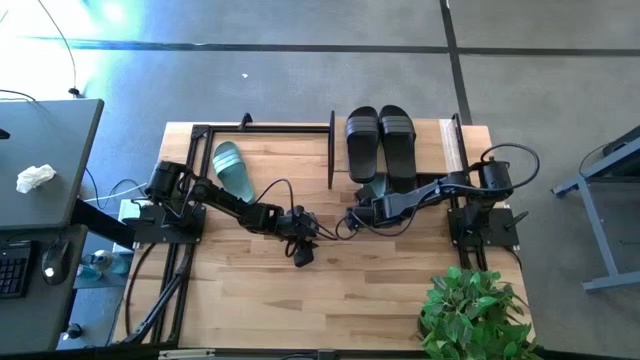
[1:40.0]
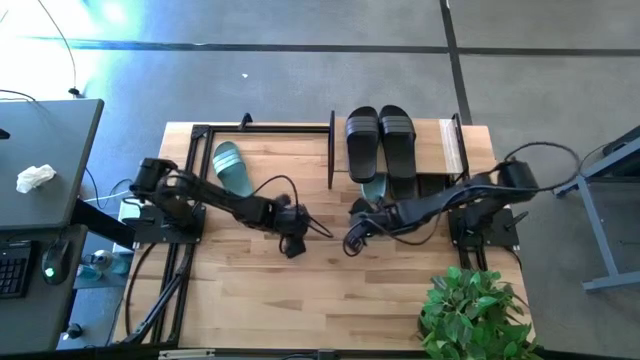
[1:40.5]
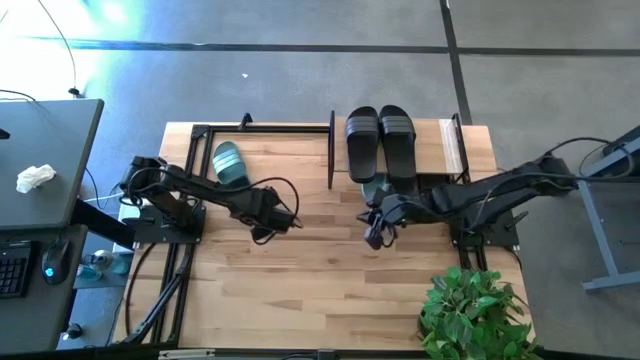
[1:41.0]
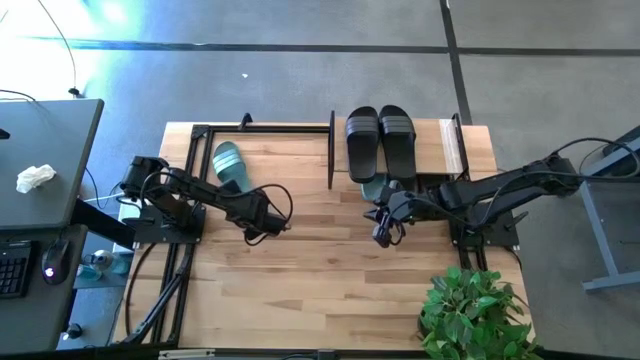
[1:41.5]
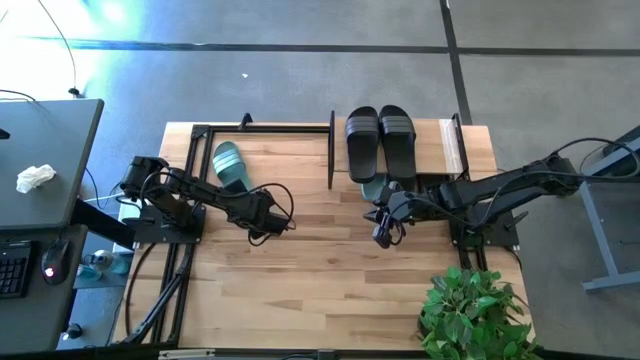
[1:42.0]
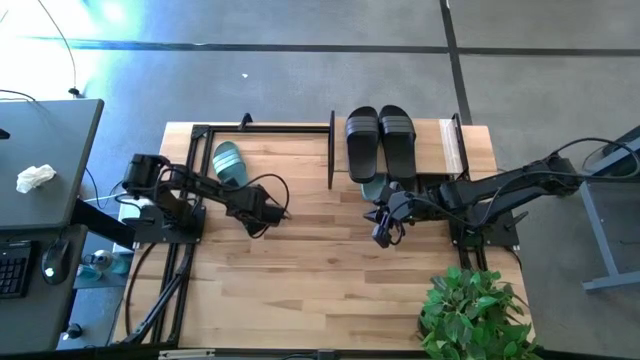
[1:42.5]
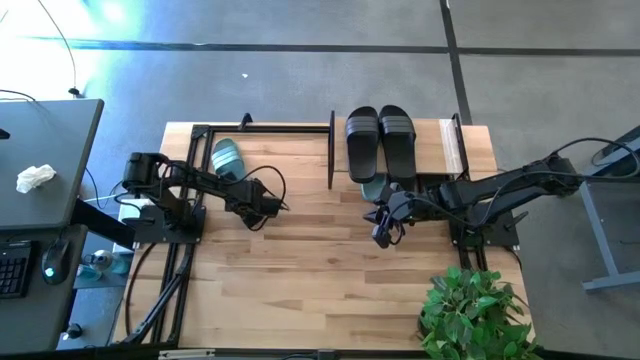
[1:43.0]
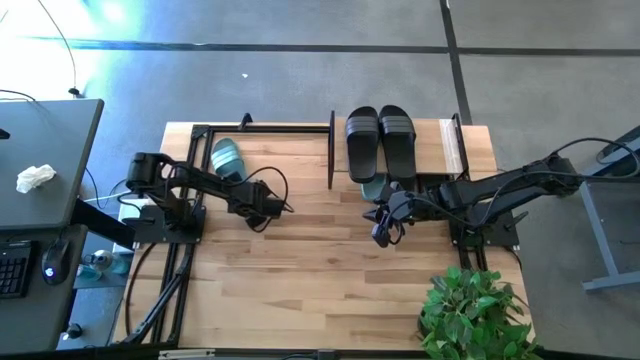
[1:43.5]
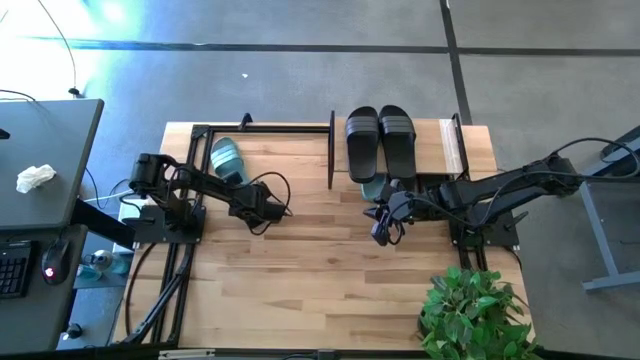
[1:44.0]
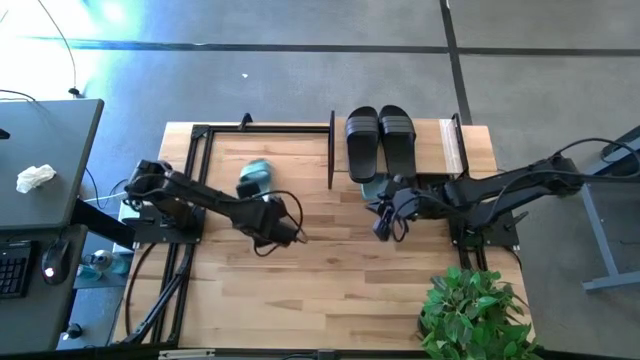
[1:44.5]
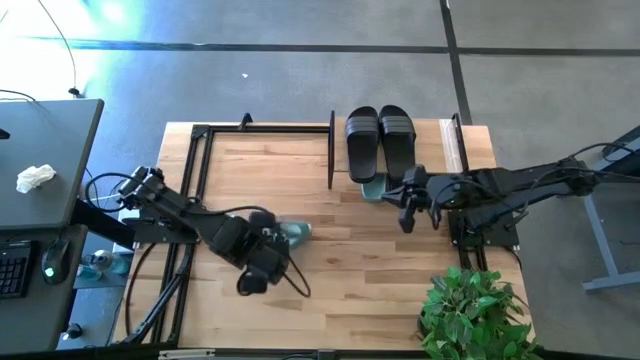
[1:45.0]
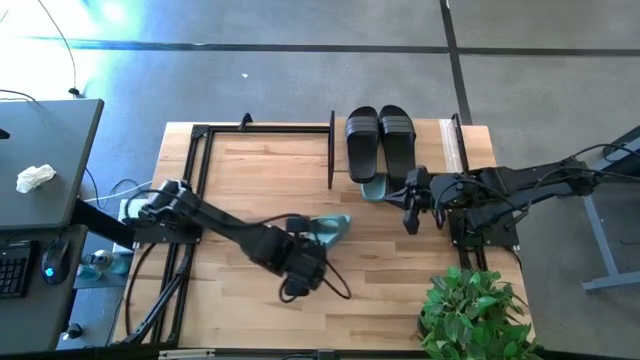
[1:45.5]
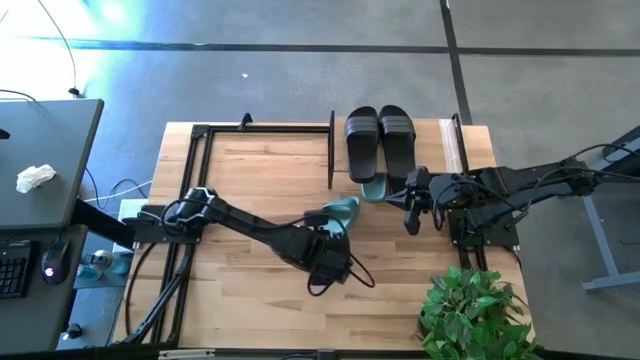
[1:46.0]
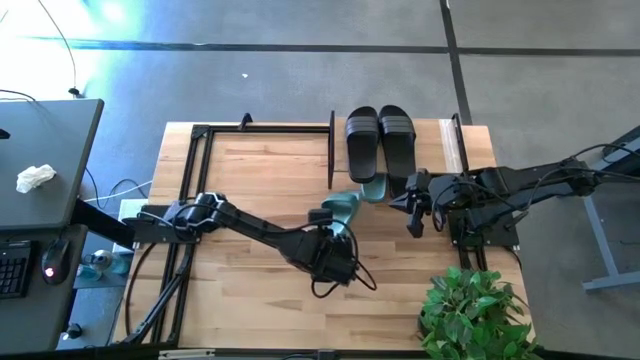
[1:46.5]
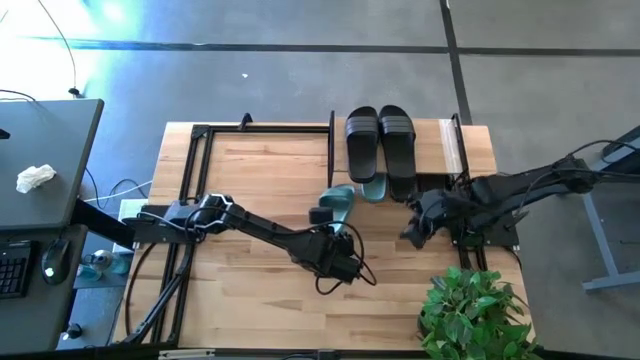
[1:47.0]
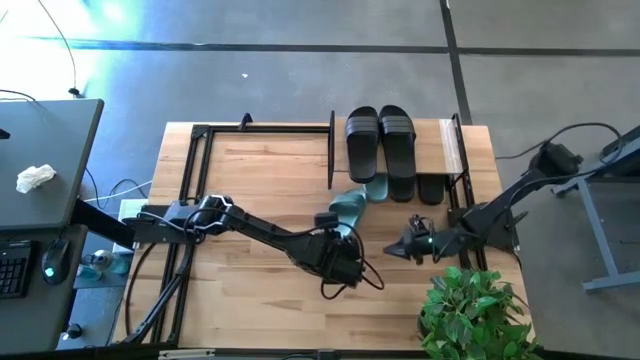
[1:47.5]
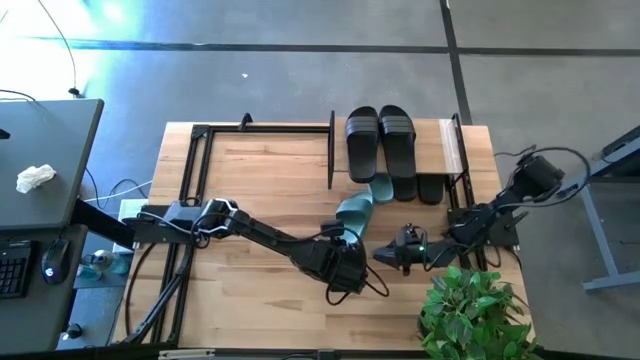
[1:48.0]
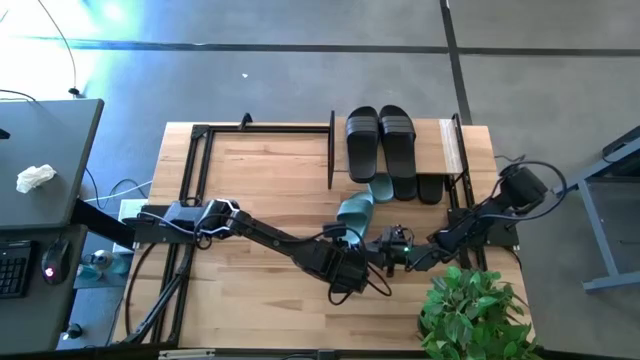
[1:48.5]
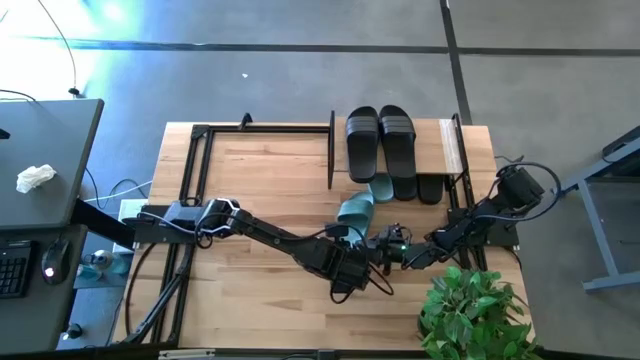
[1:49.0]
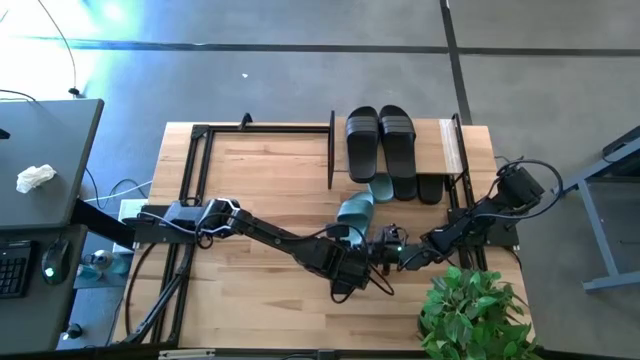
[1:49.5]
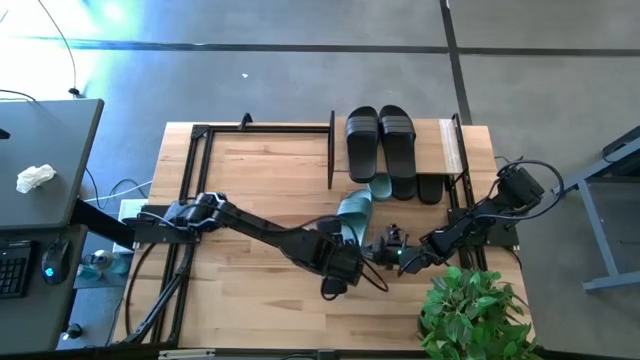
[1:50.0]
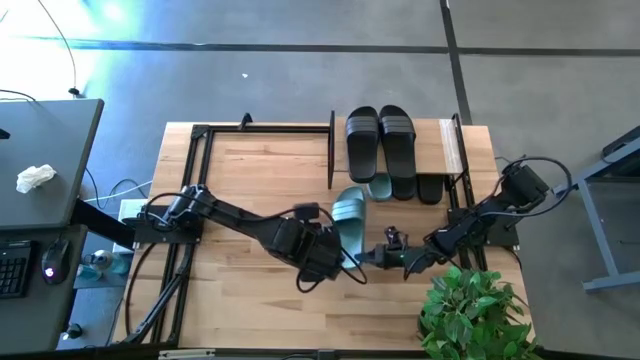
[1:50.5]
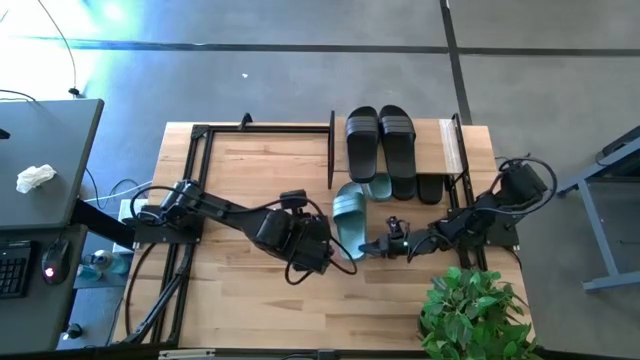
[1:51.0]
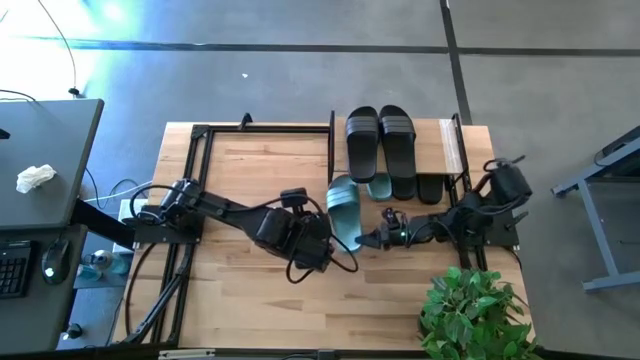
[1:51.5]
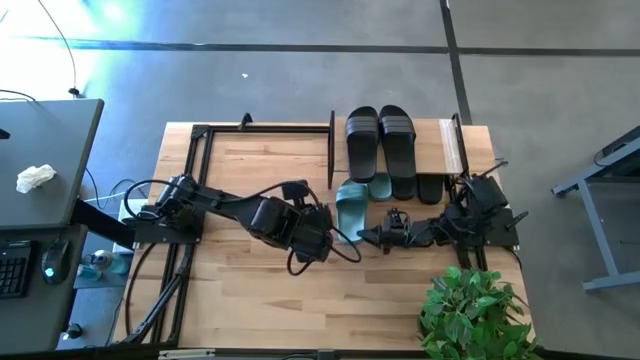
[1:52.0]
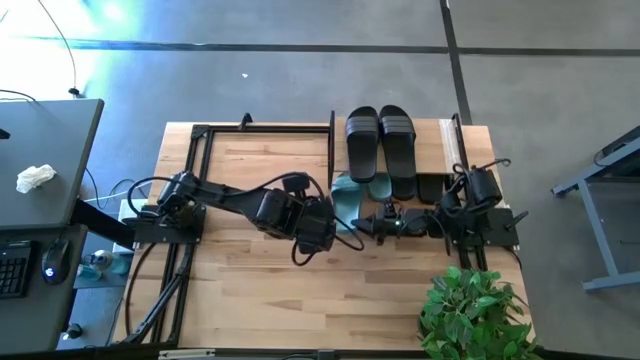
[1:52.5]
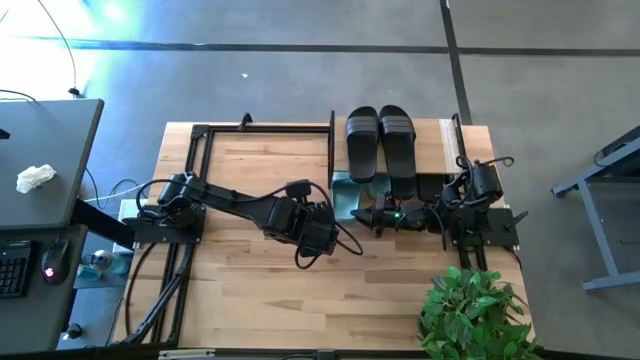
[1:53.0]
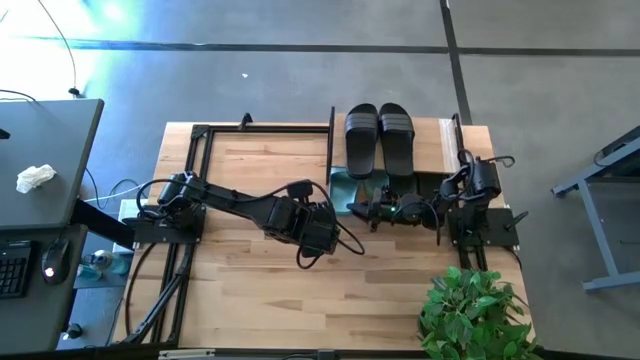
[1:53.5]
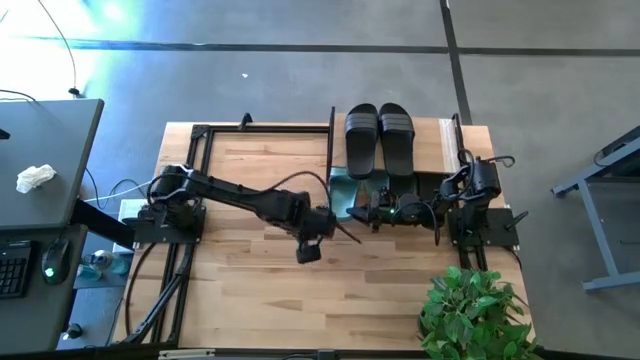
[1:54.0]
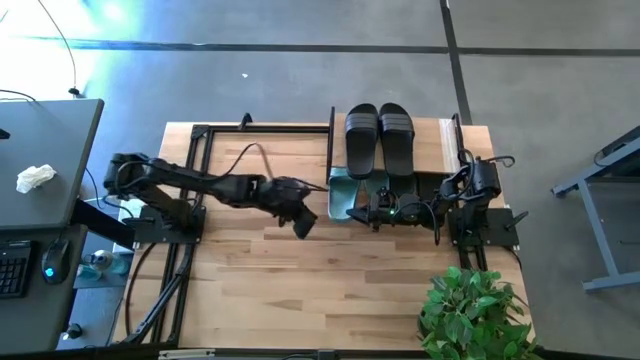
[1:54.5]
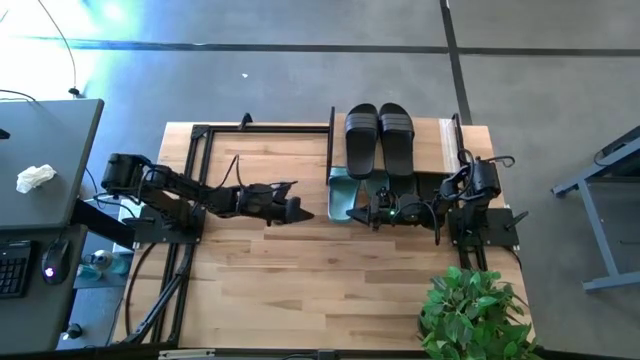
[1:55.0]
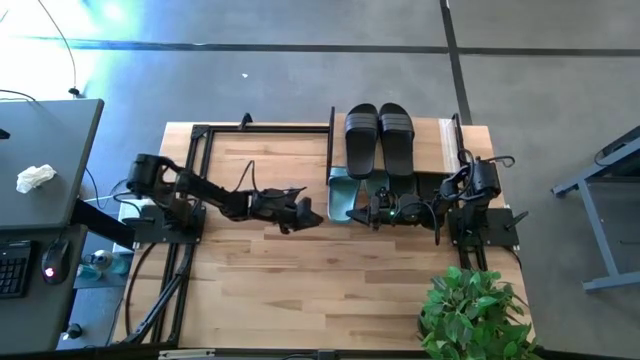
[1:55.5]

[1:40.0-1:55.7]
Task: Pick and place slides into the shelf
Put the green slipper under the shelf

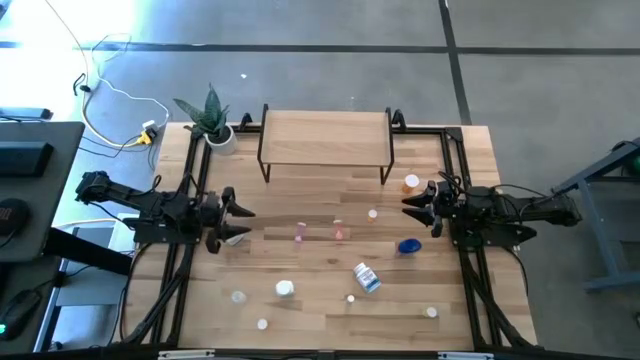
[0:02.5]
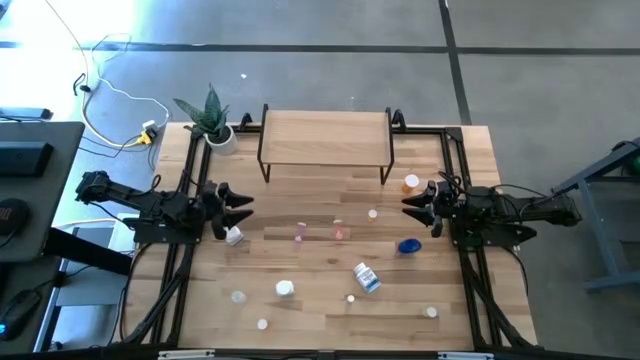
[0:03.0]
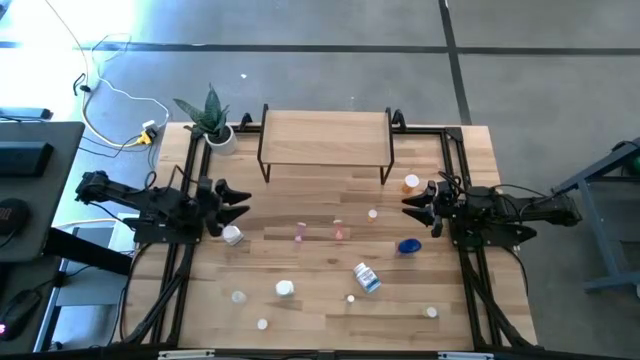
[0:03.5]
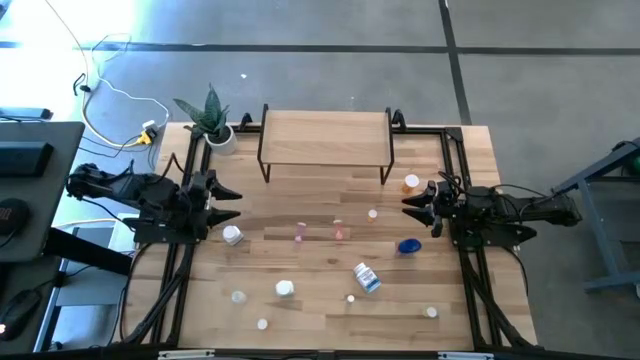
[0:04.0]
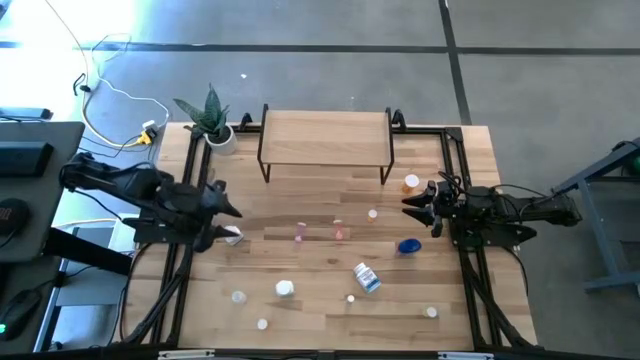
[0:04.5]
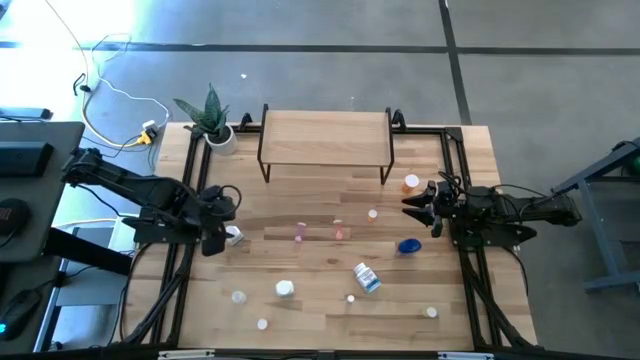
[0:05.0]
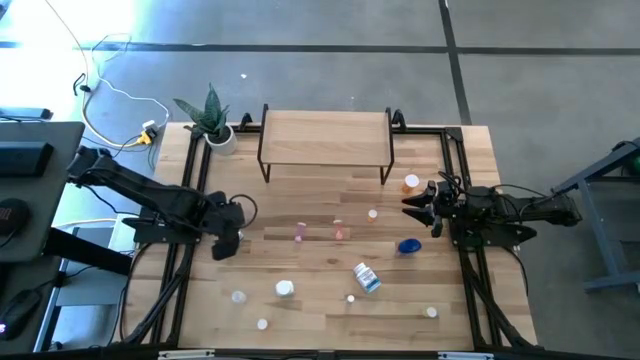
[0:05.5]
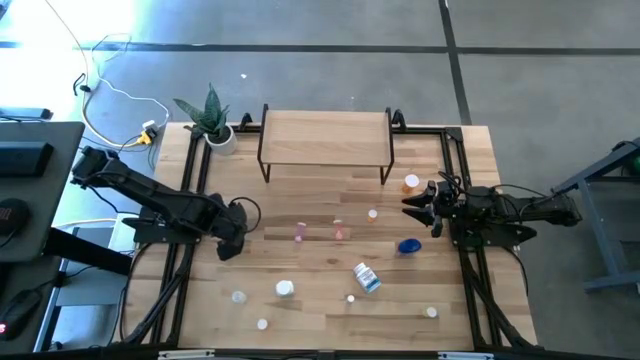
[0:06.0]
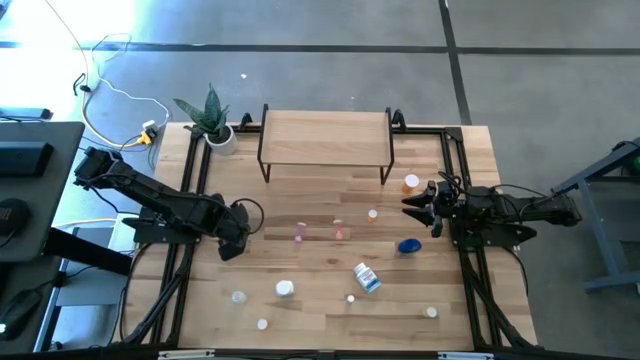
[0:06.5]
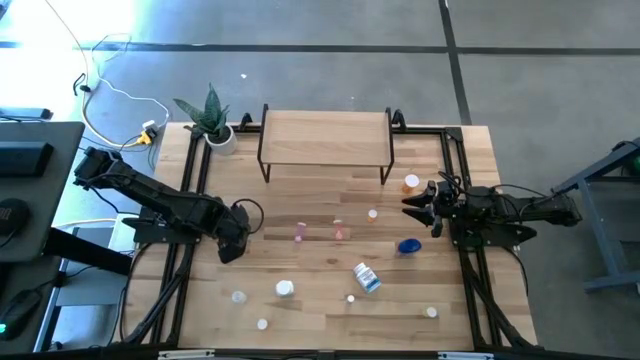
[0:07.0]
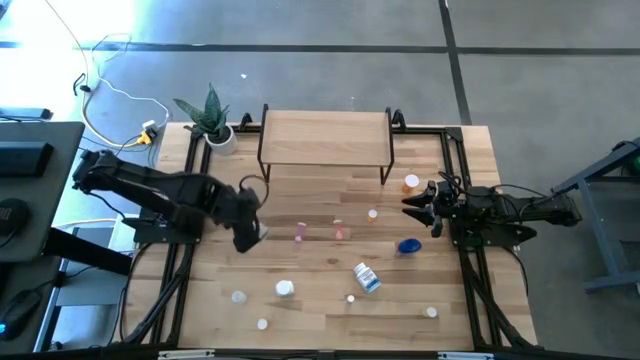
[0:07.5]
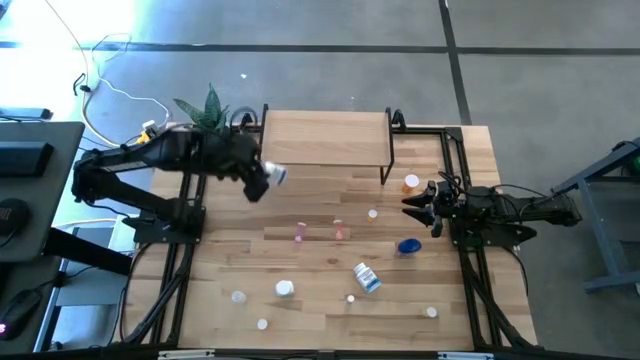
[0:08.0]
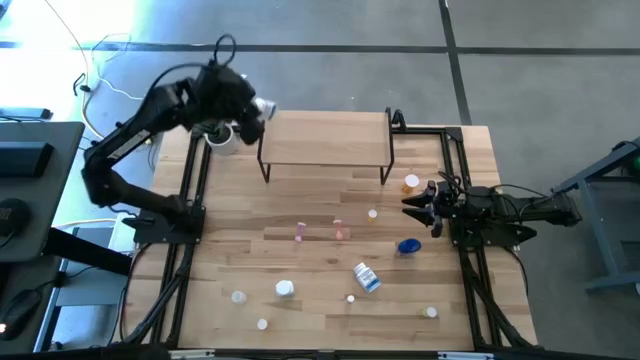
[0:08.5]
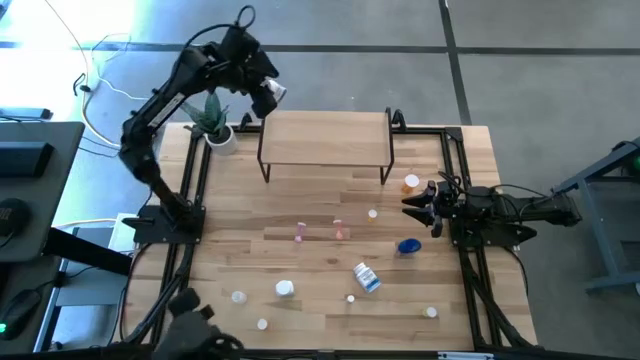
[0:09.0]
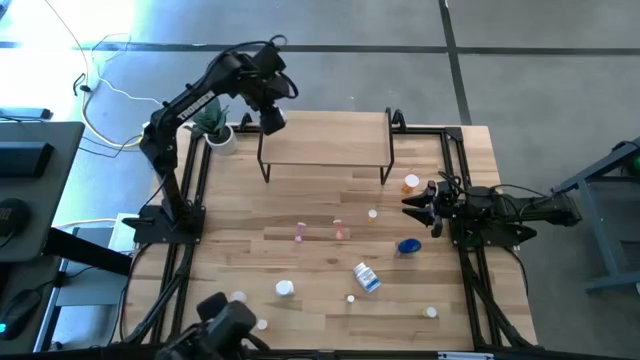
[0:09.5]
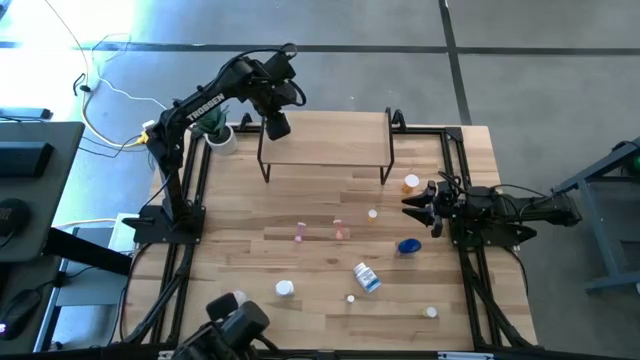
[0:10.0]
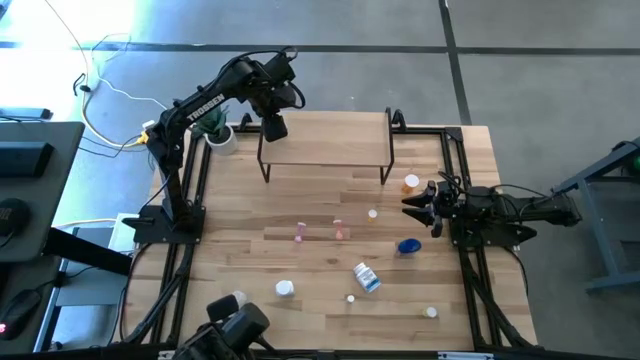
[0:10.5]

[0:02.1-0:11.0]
Task: Pick and place medicine bottles onto shelf by color
Put the top left white pill bottle on the shelf
